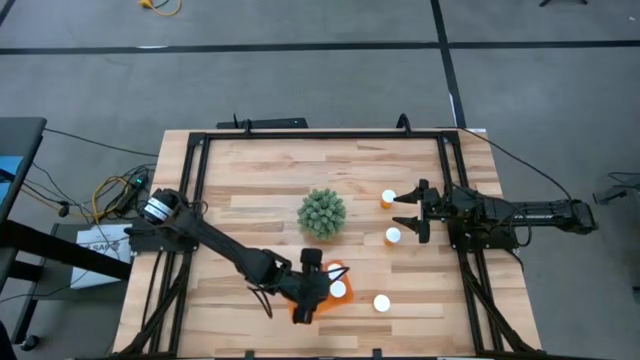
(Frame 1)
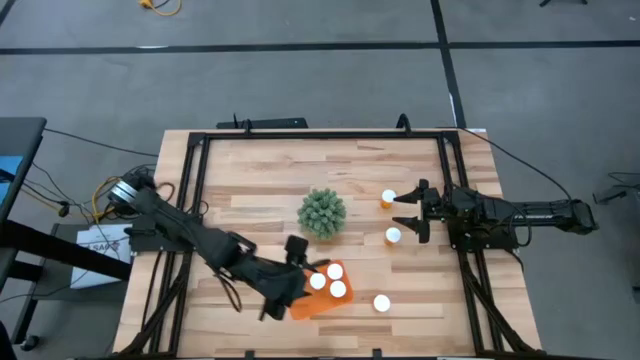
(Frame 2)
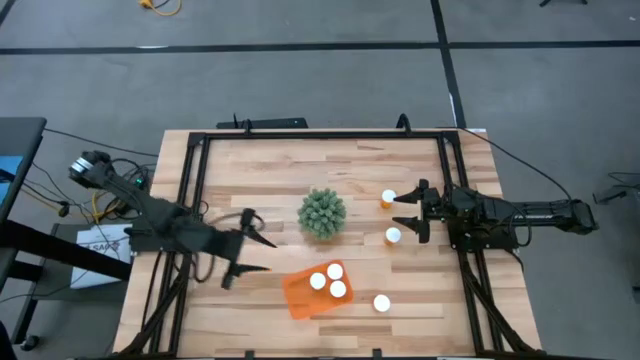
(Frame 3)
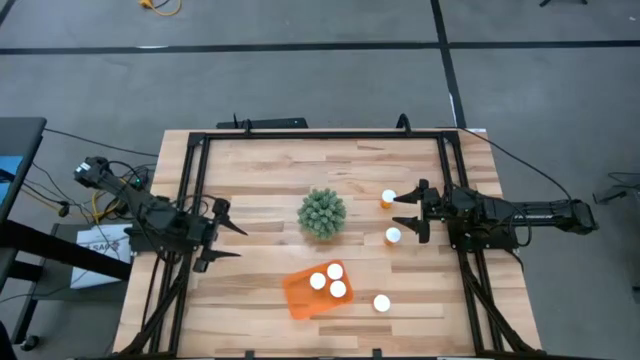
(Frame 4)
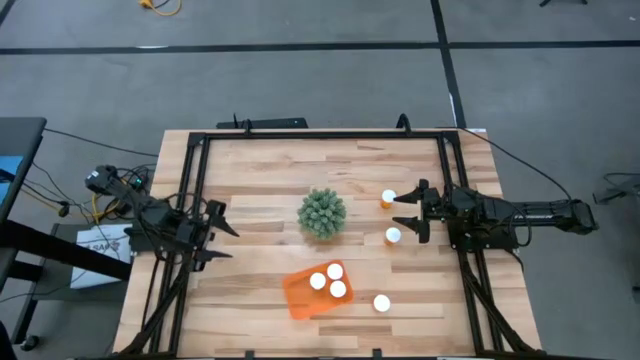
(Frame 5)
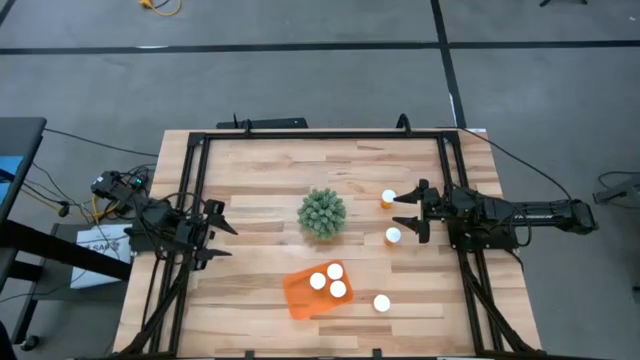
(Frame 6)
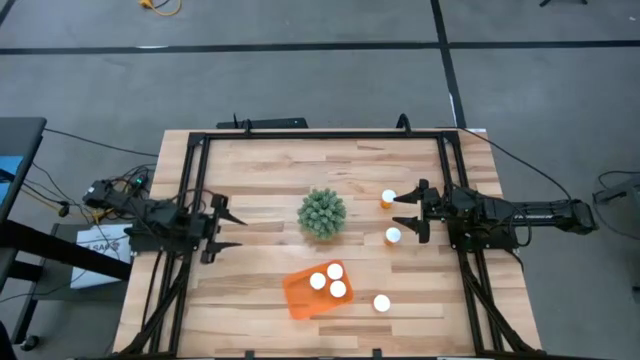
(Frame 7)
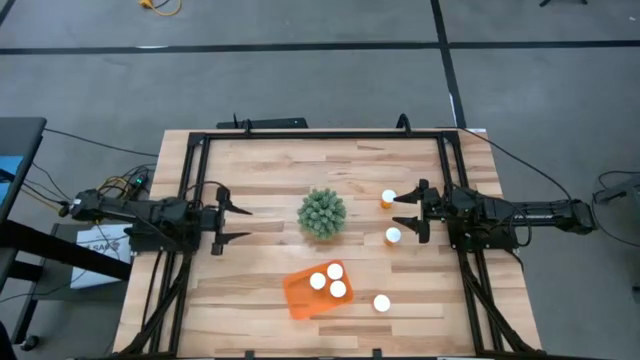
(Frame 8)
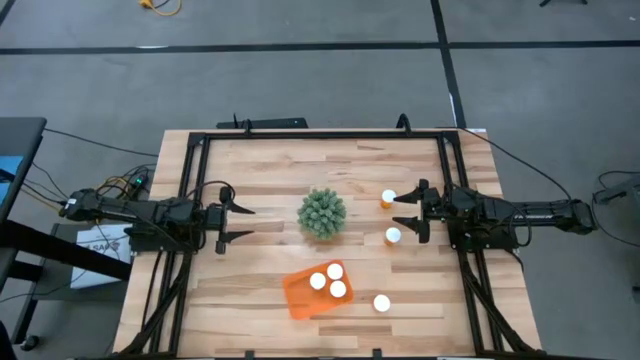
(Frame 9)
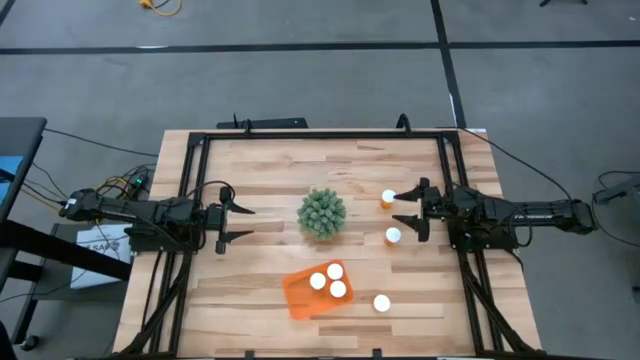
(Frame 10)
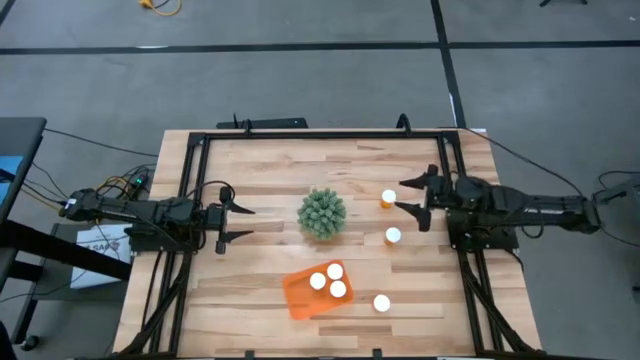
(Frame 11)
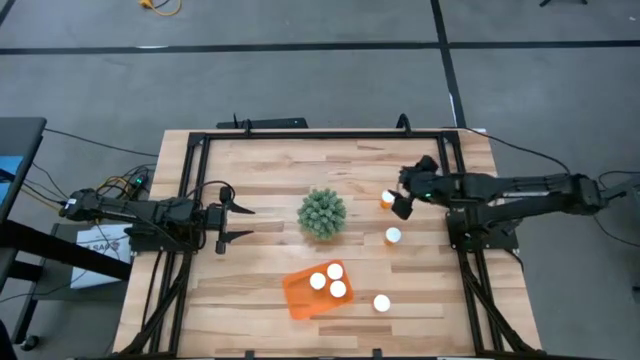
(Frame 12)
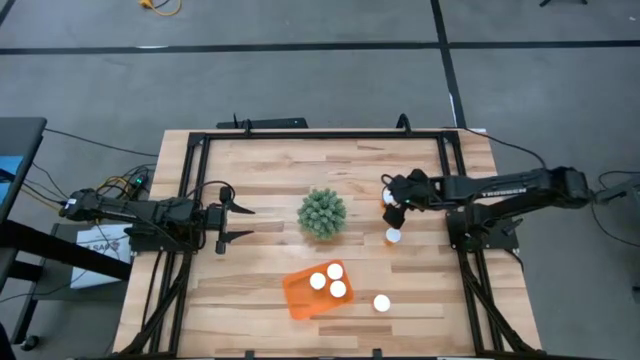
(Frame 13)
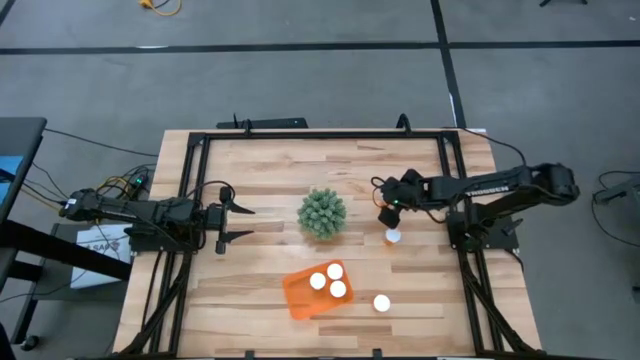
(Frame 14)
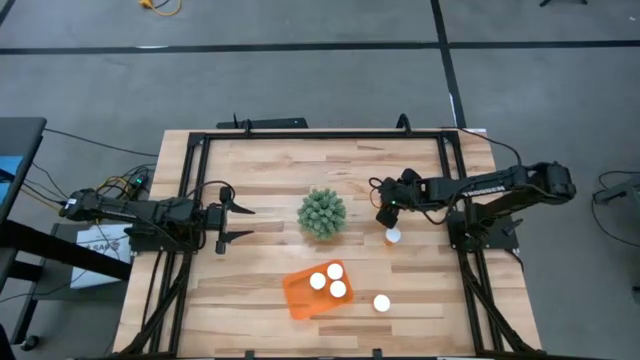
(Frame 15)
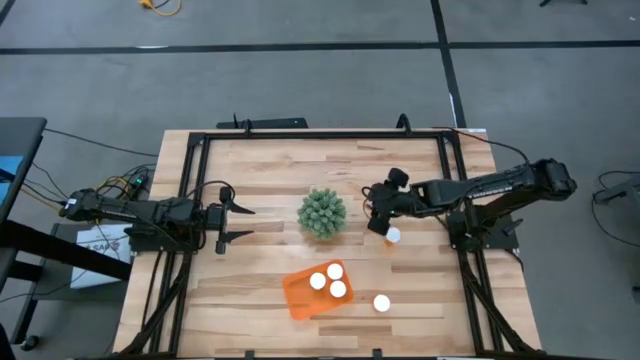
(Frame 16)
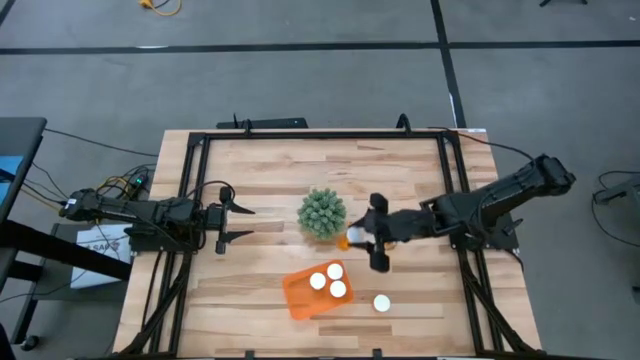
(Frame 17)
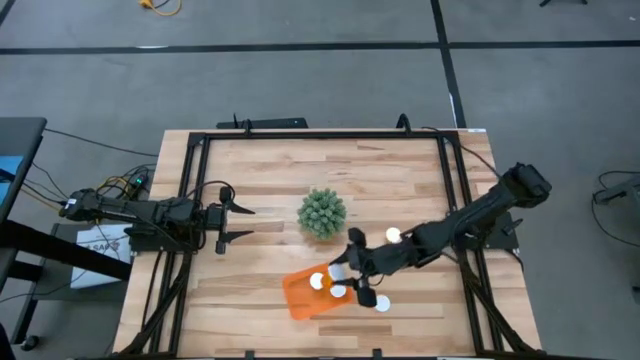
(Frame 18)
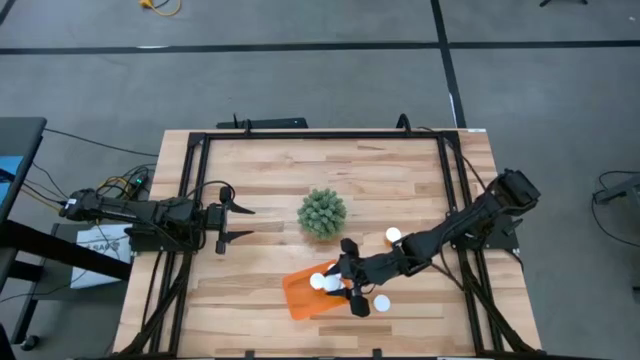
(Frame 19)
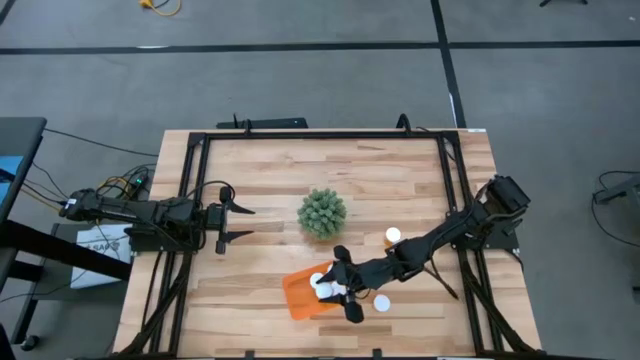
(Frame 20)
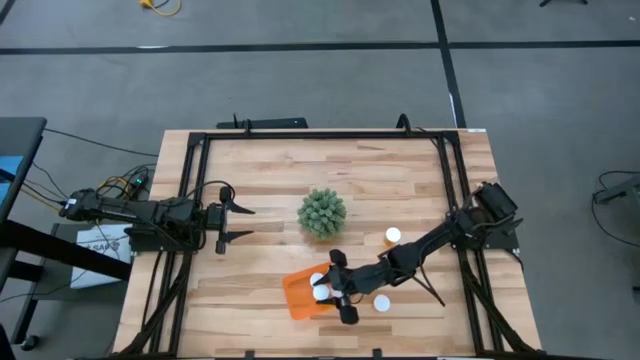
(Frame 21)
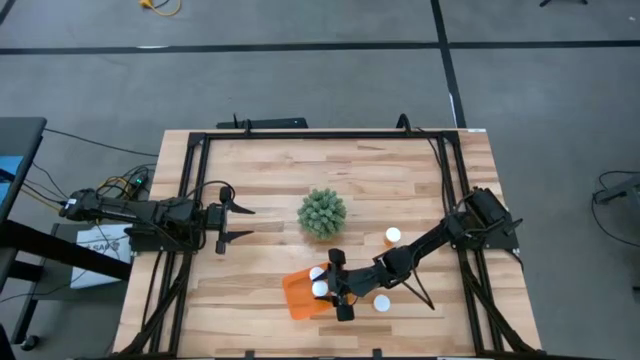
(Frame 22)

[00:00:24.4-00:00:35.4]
Task: Pick and place pill bottles into a basket
Put the orange pill bottle into the orange bin

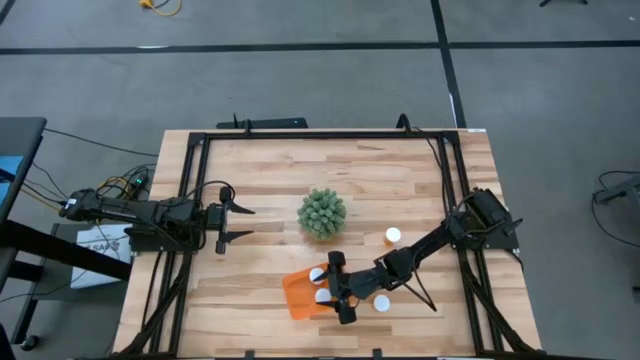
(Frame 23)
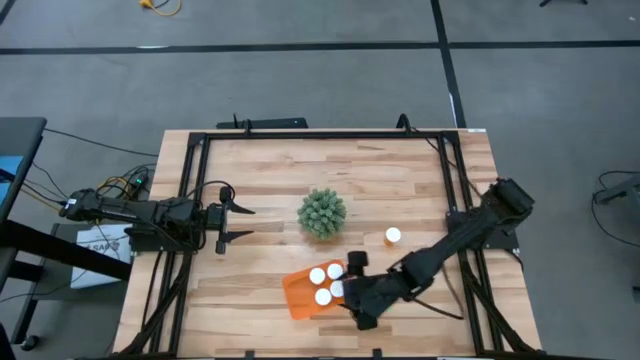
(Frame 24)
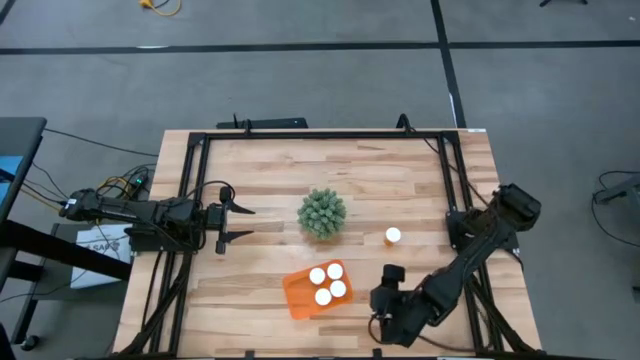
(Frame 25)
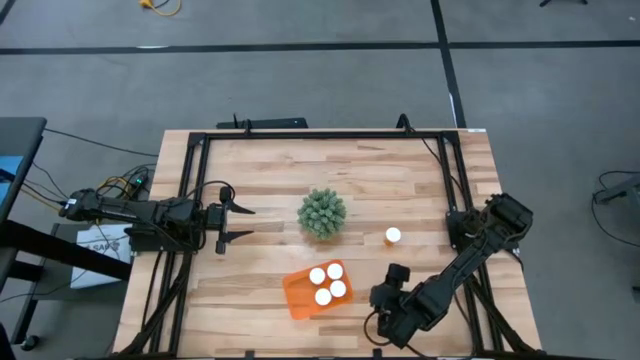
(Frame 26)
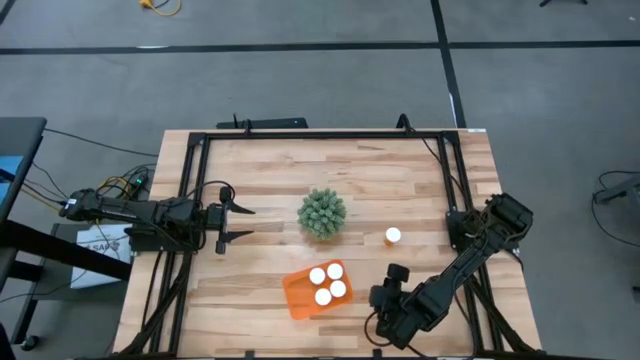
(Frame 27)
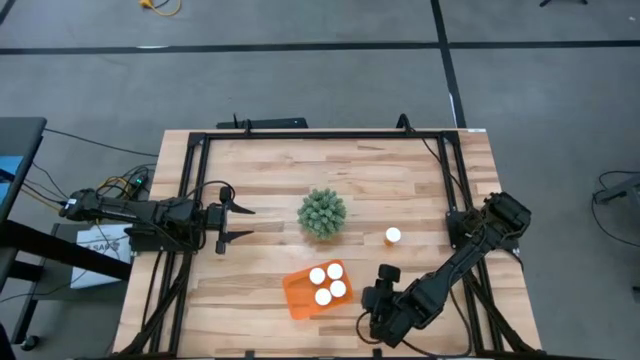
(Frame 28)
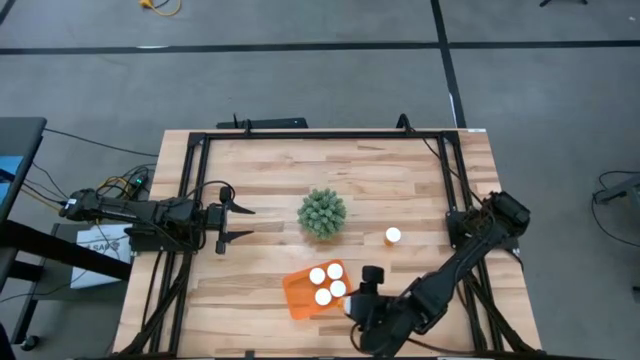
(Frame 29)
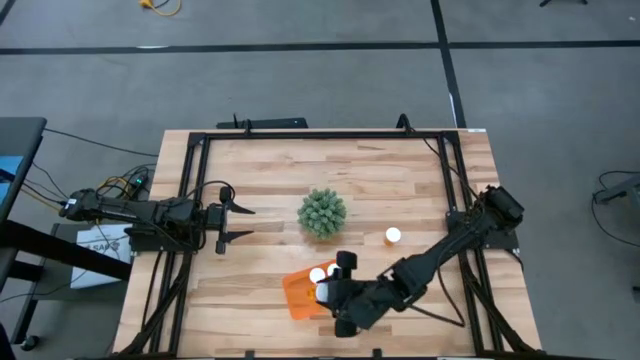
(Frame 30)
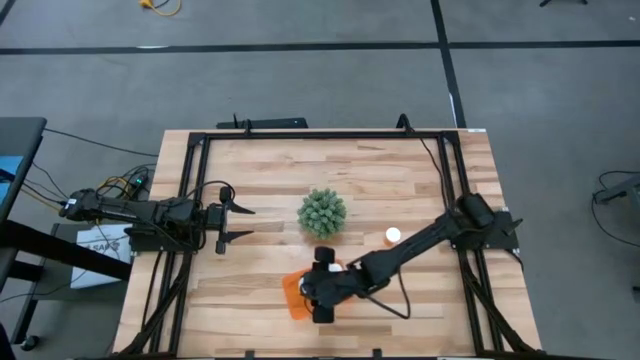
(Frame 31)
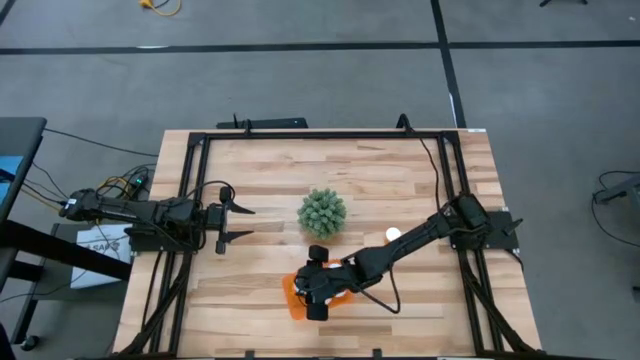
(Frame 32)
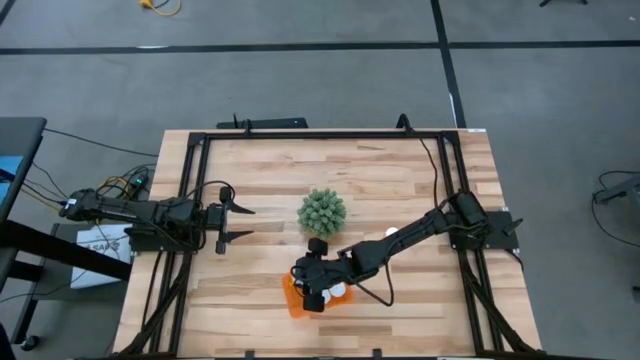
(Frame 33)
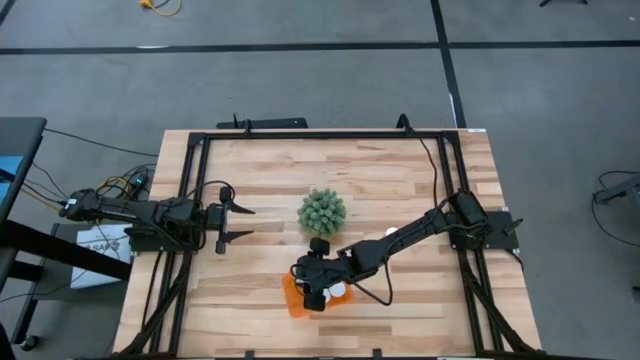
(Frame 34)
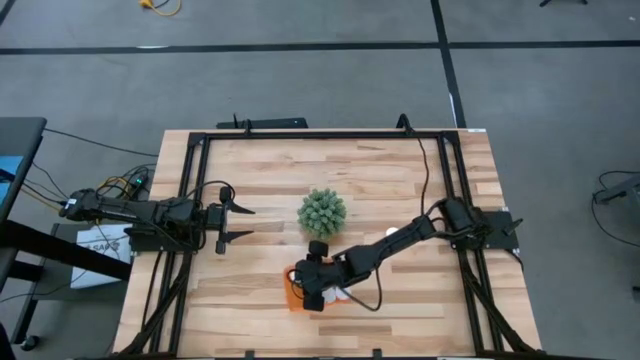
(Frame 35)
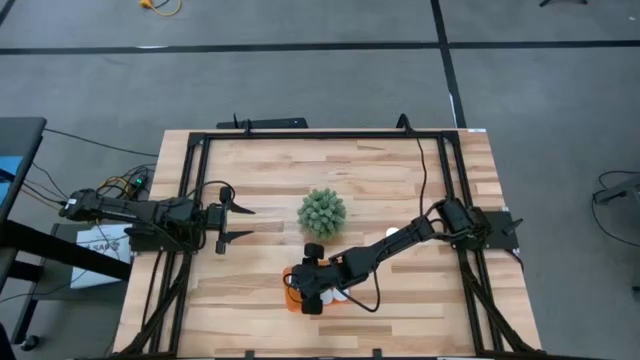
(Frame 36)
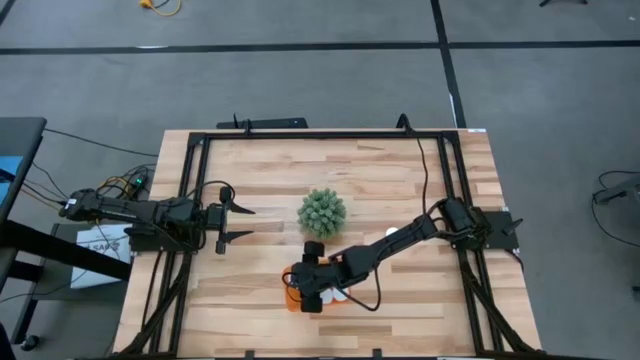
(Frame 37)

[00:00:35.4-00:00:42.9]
Put the orange pill bottle into the orange bin
